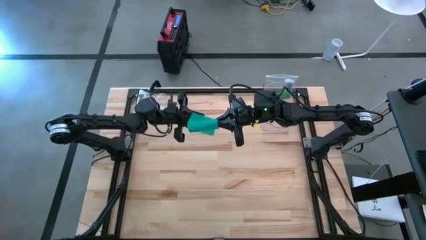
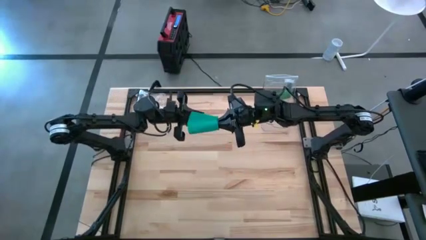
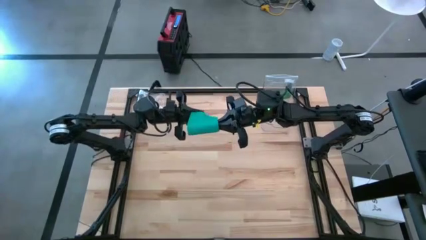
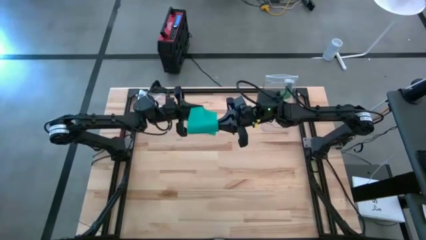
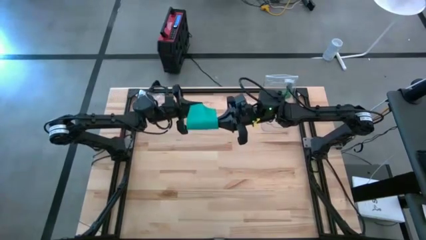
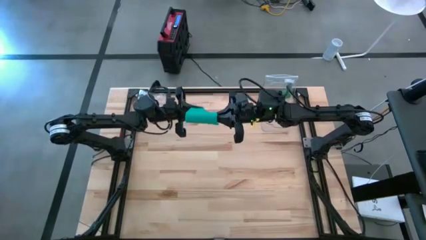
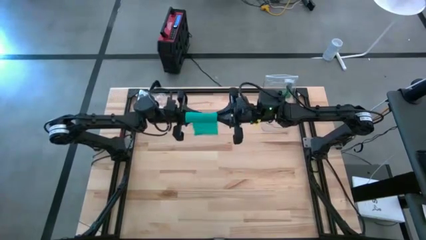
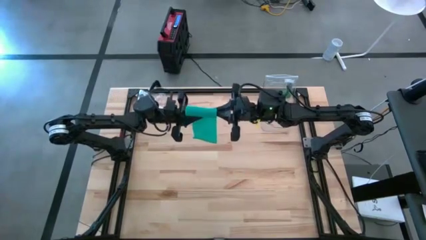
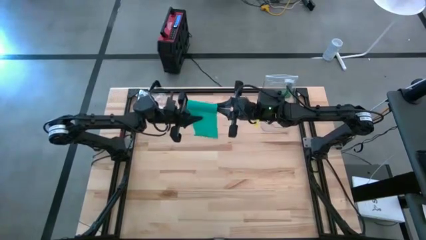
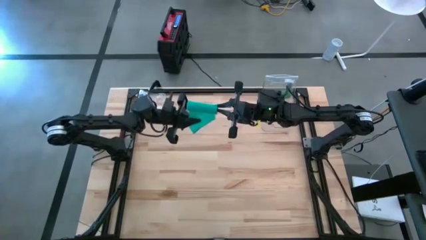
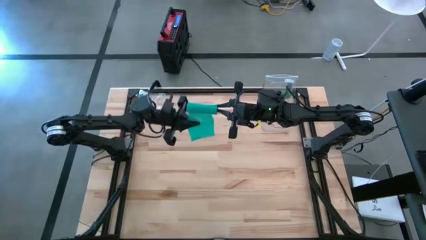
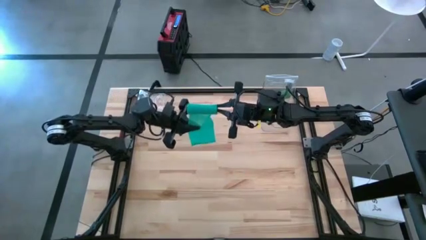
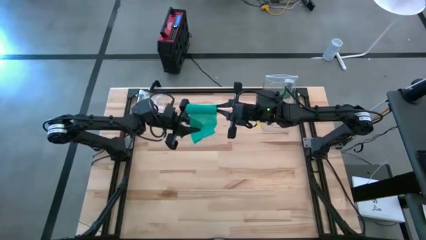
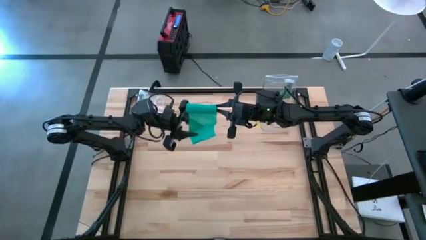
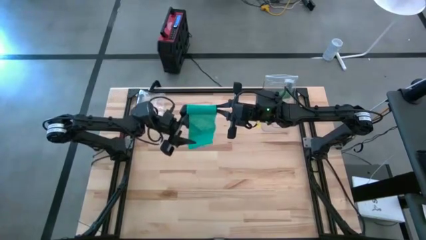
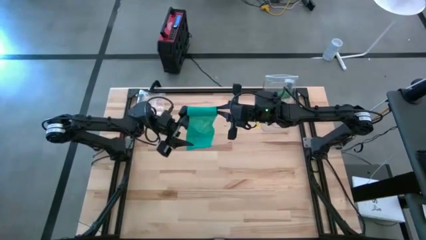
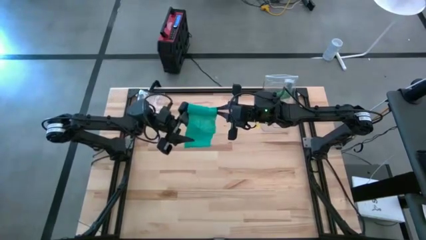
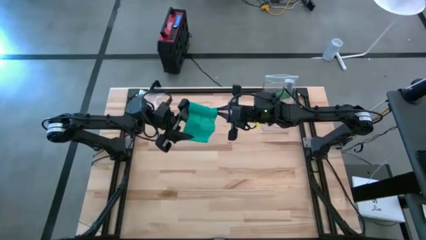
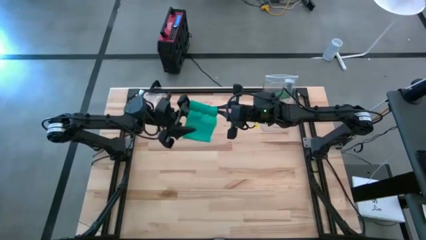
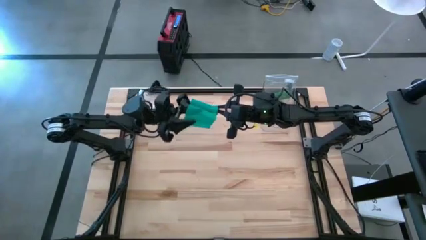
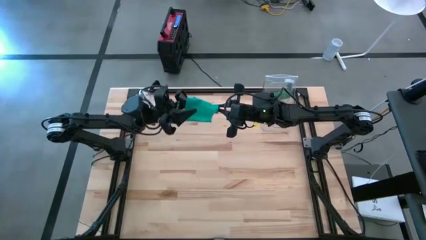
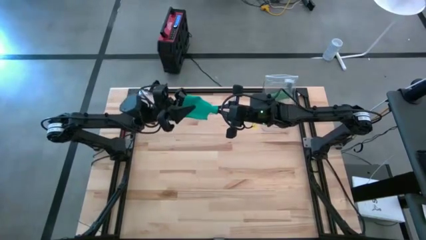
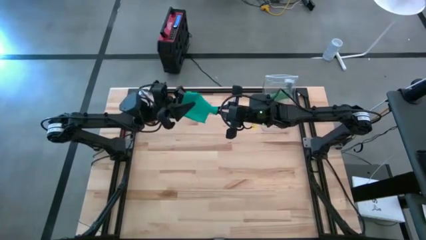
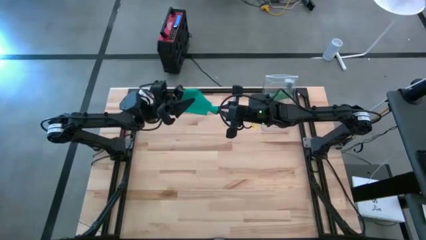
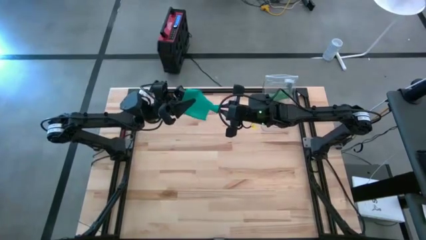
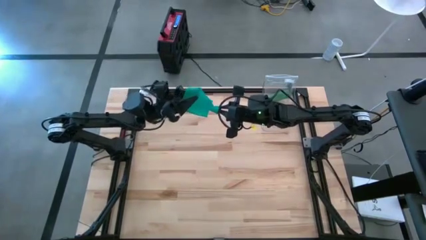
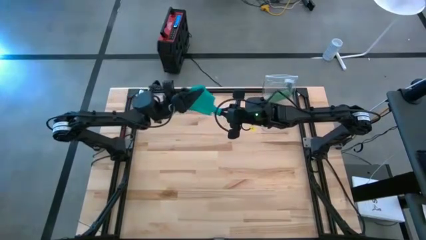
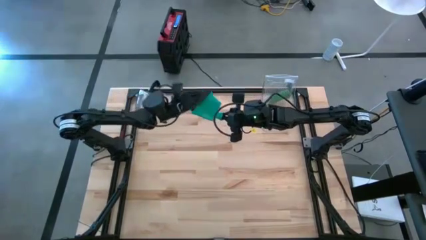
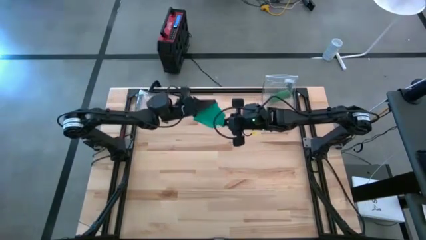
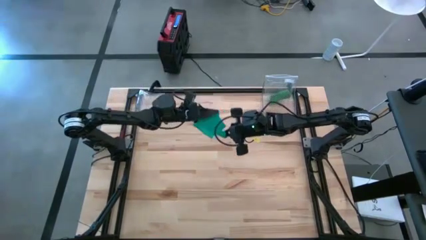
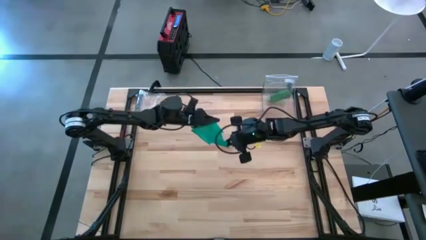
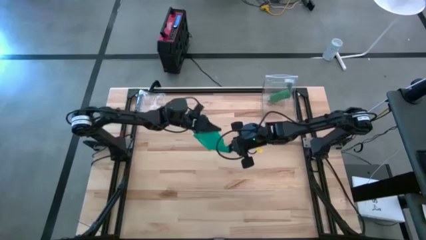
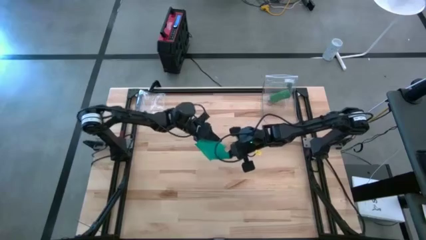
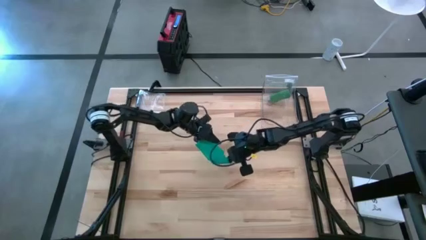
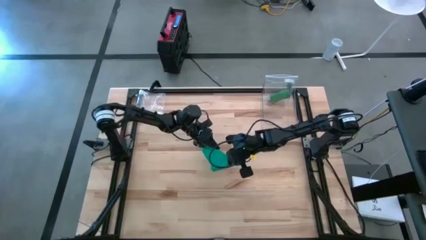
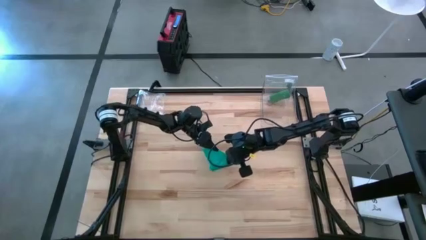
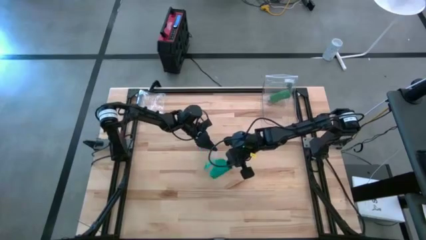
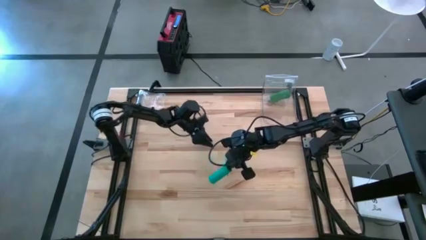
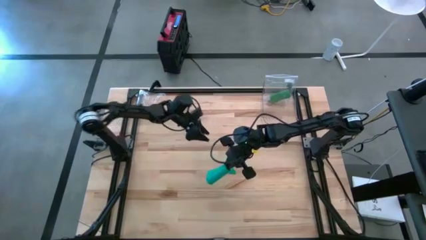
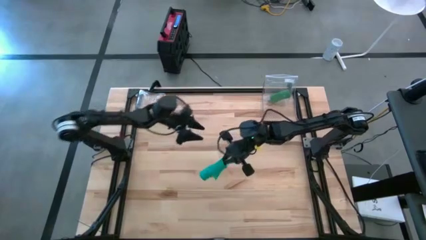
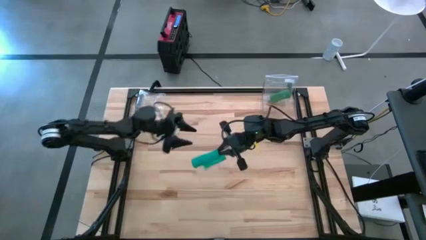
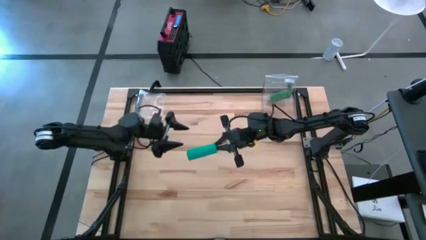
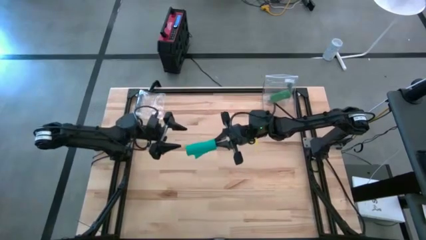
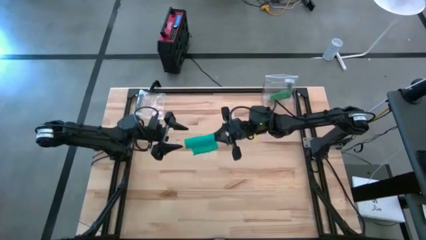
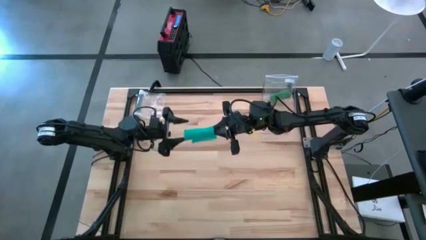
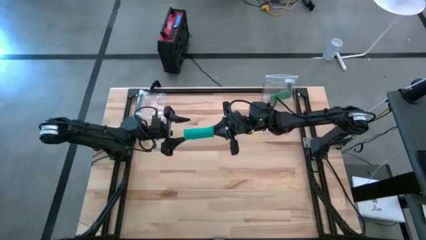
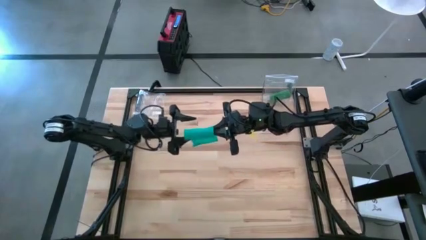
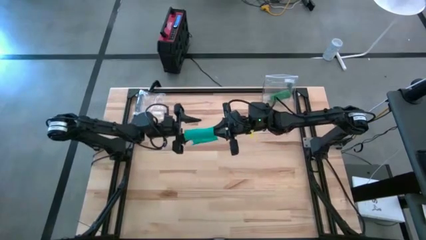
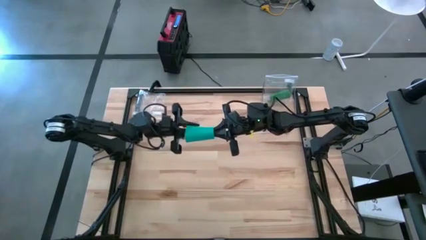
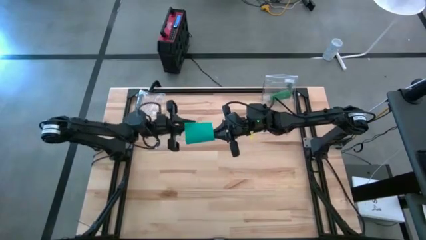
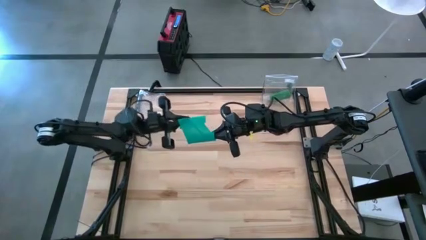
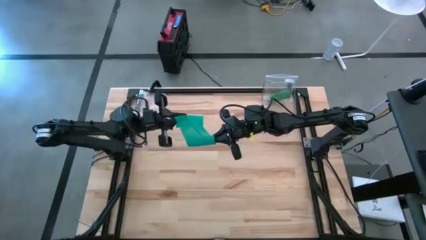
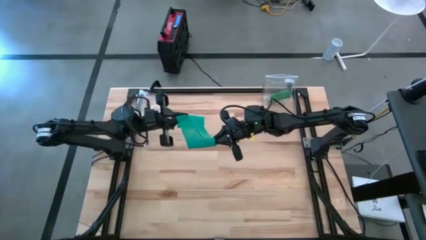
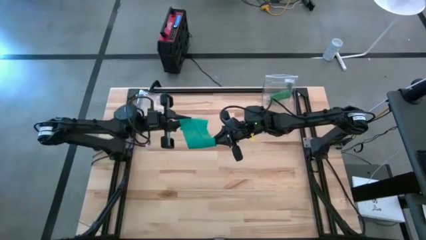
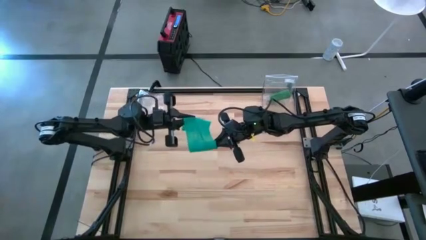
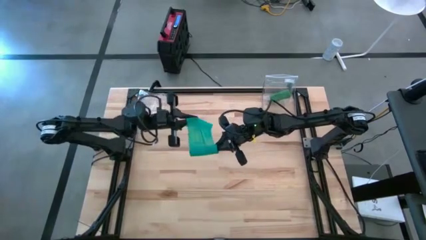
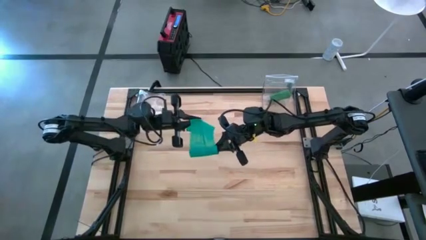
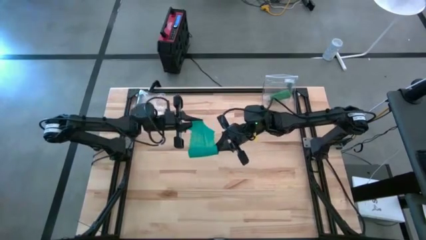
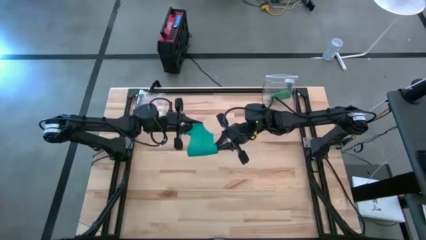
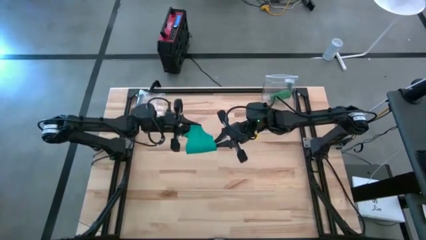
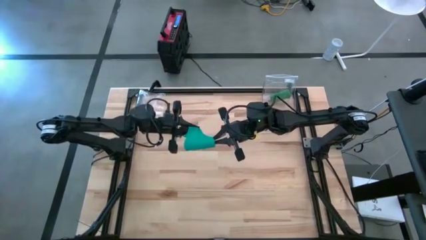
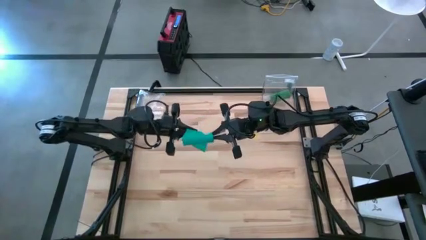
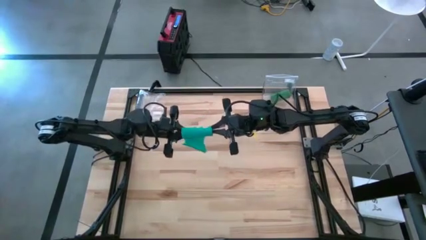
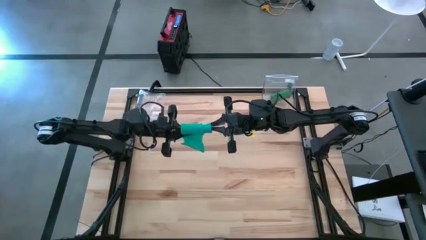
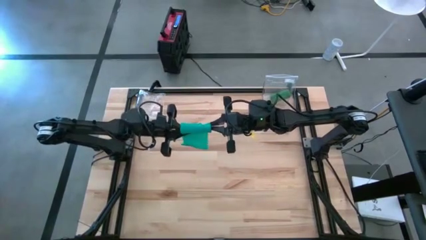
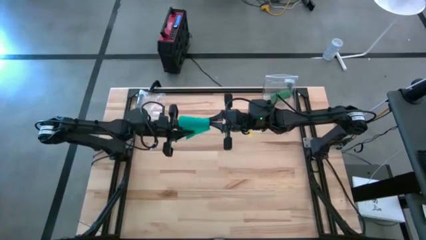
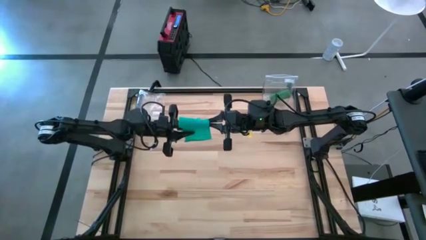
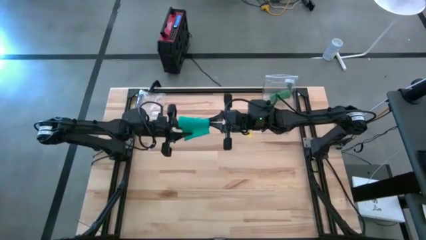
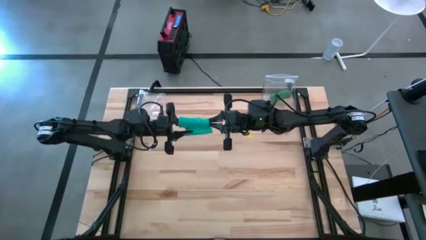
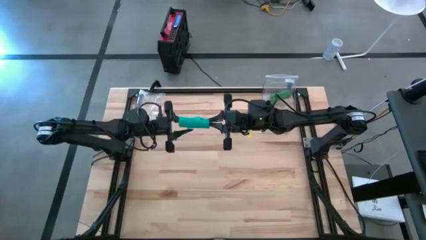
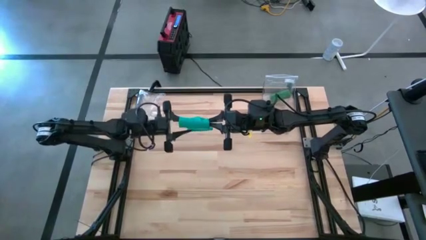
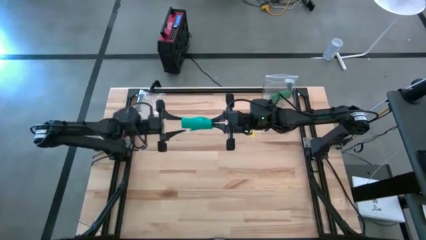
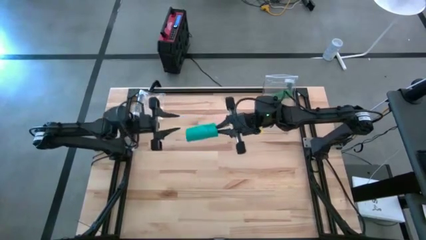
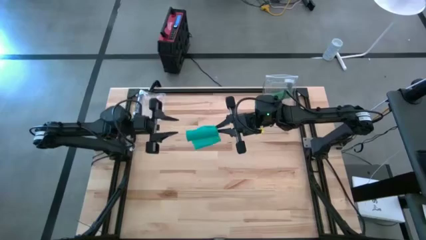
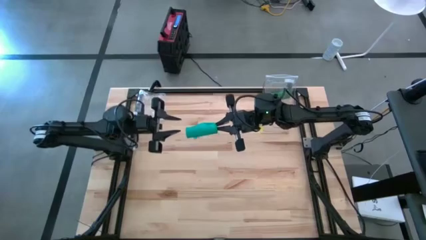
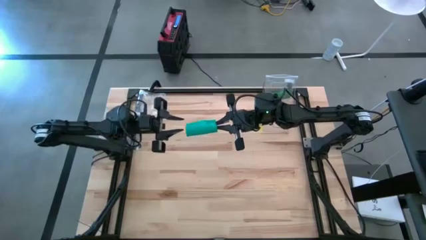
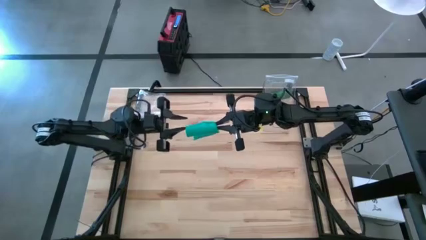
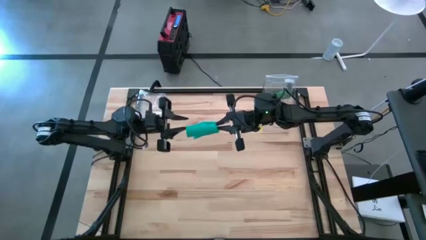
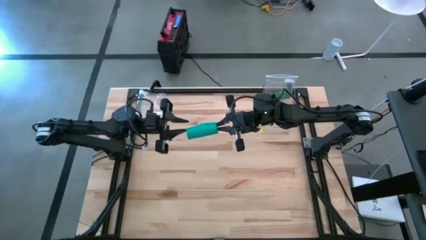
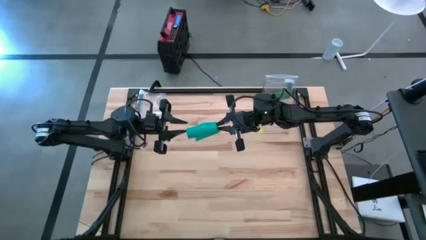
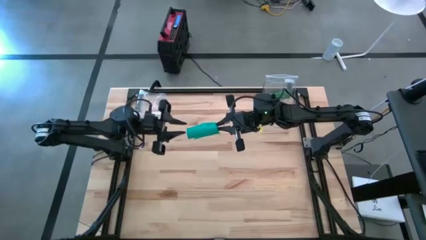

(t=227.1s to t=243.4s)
Task: Roll bandage
Roll the dark green bandage
